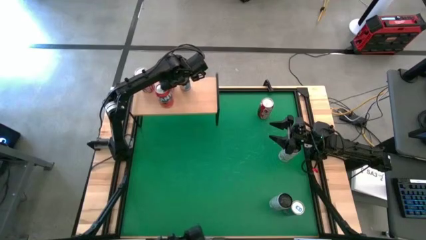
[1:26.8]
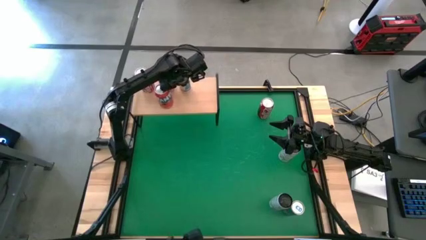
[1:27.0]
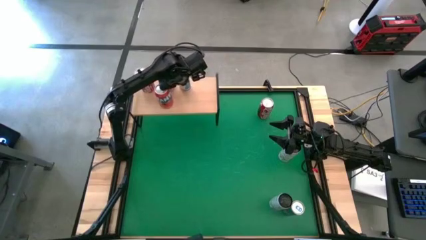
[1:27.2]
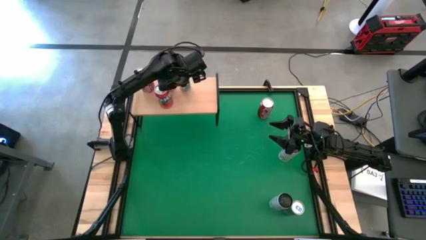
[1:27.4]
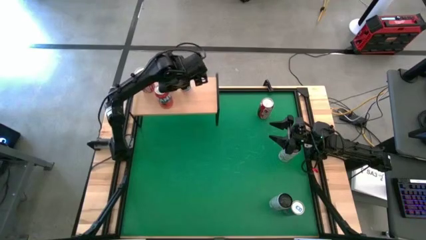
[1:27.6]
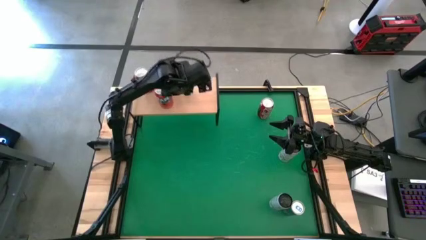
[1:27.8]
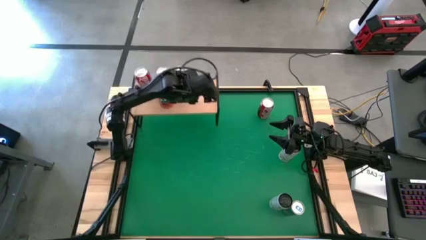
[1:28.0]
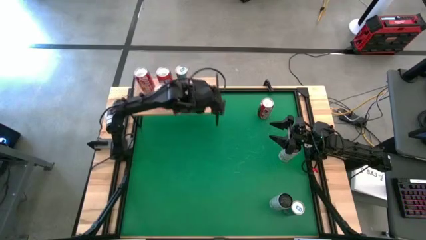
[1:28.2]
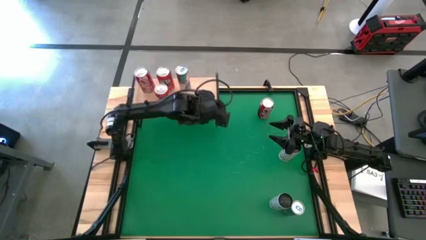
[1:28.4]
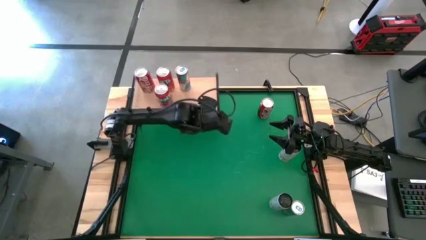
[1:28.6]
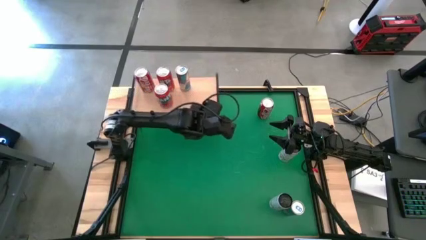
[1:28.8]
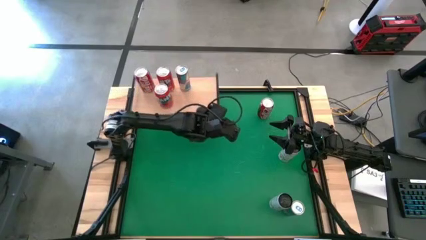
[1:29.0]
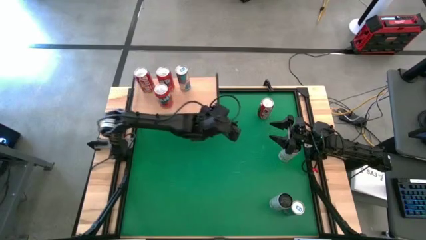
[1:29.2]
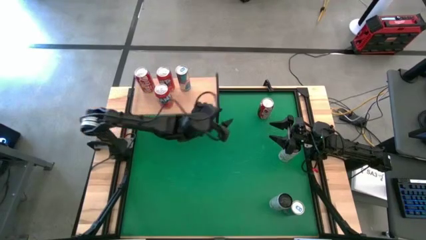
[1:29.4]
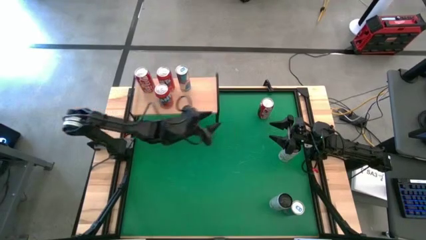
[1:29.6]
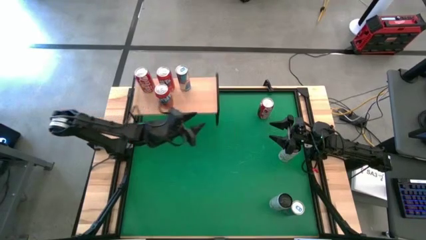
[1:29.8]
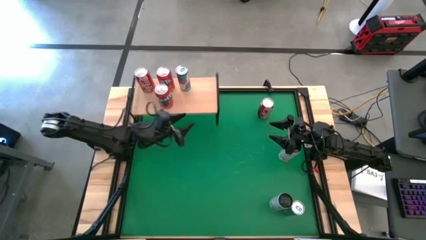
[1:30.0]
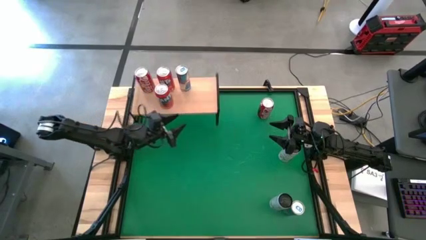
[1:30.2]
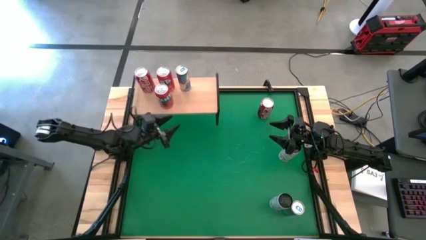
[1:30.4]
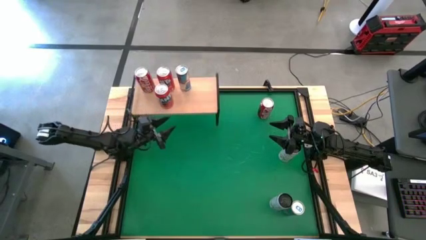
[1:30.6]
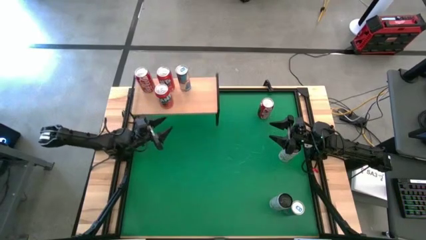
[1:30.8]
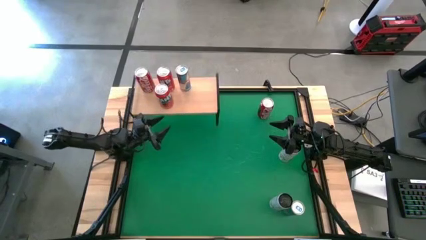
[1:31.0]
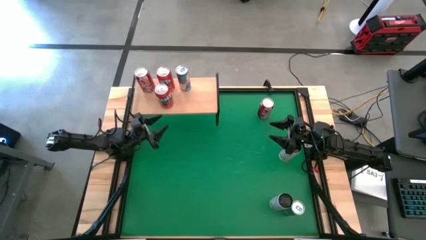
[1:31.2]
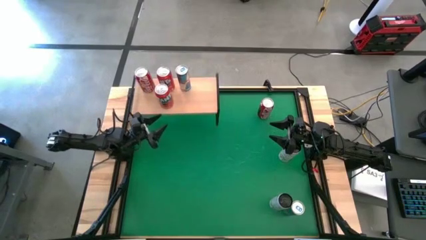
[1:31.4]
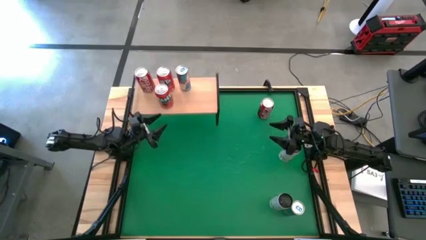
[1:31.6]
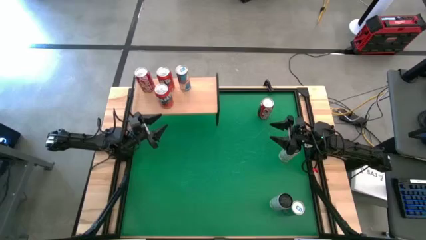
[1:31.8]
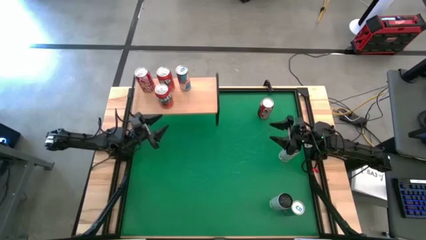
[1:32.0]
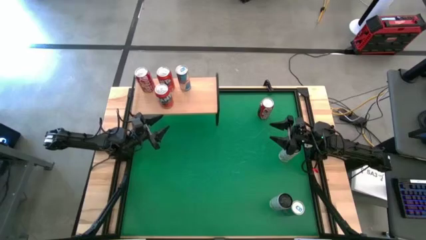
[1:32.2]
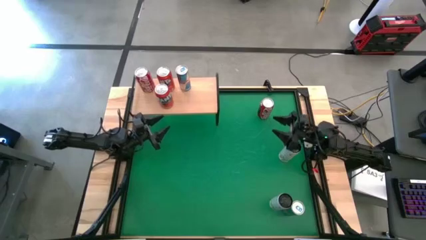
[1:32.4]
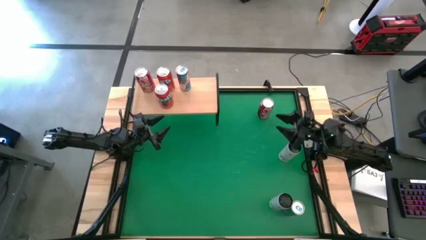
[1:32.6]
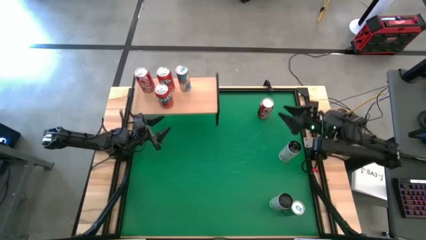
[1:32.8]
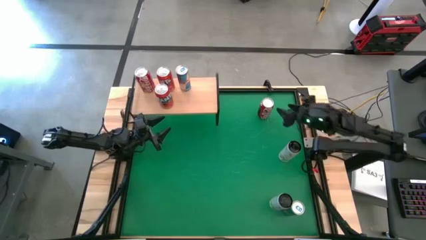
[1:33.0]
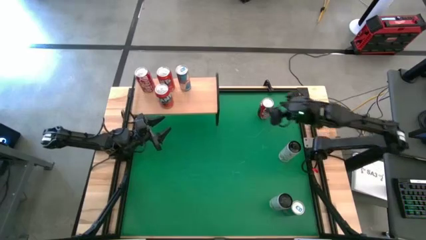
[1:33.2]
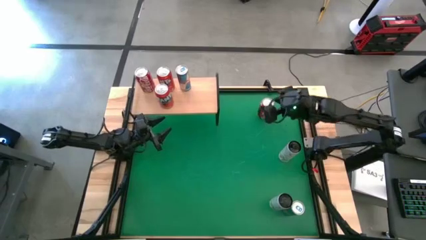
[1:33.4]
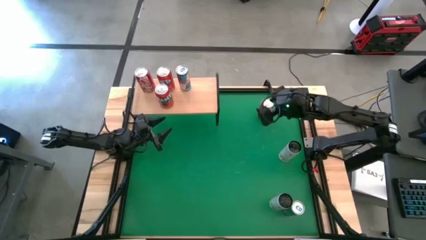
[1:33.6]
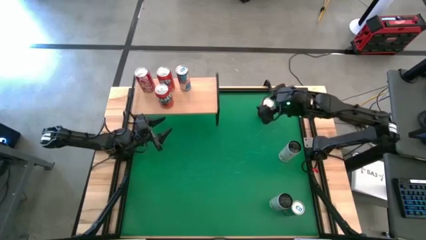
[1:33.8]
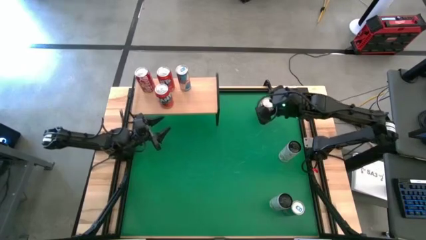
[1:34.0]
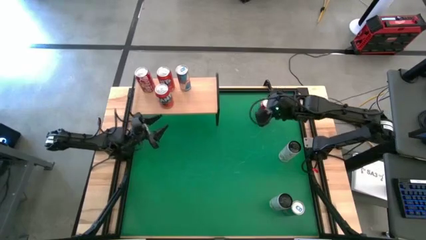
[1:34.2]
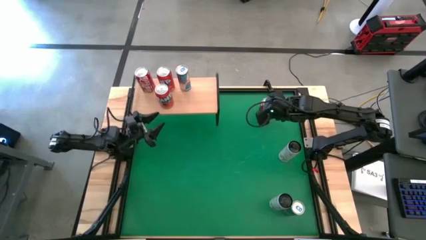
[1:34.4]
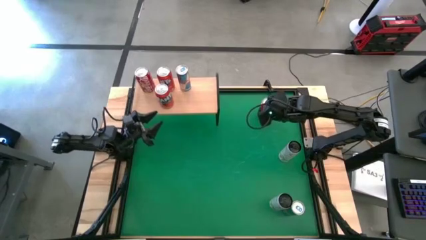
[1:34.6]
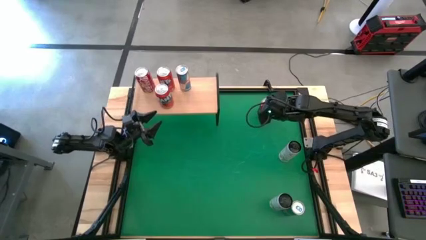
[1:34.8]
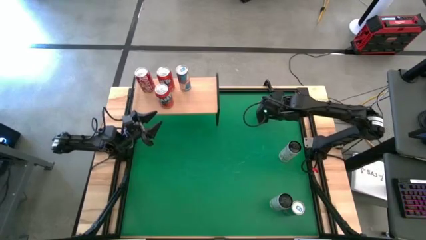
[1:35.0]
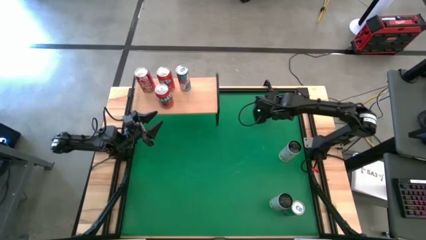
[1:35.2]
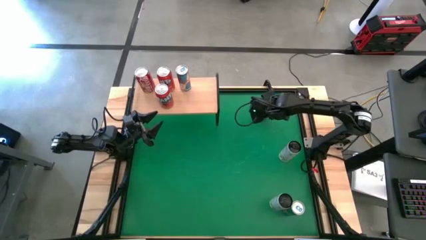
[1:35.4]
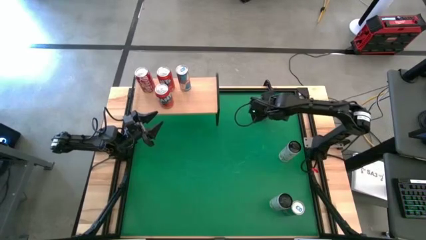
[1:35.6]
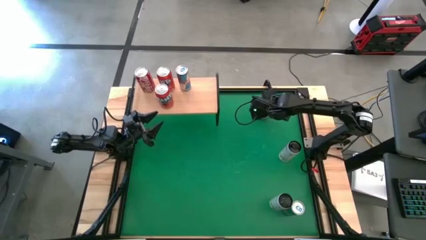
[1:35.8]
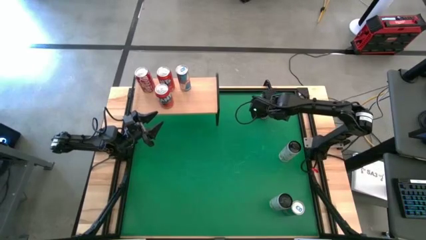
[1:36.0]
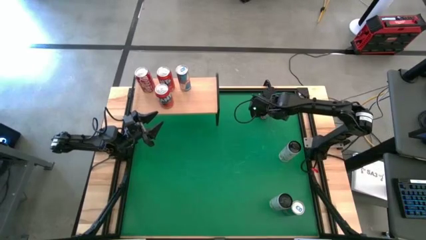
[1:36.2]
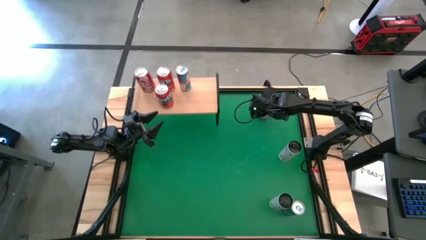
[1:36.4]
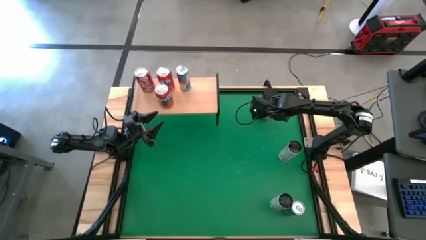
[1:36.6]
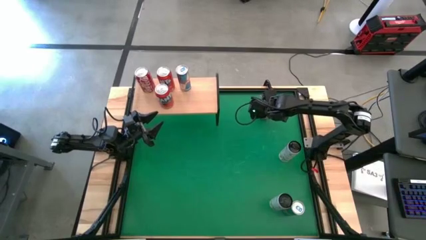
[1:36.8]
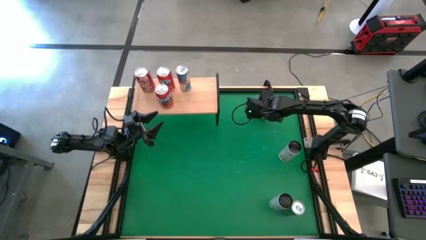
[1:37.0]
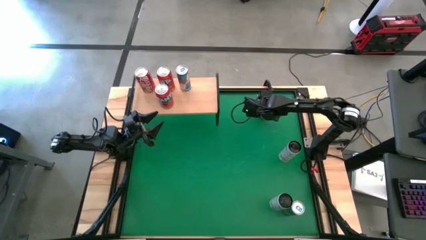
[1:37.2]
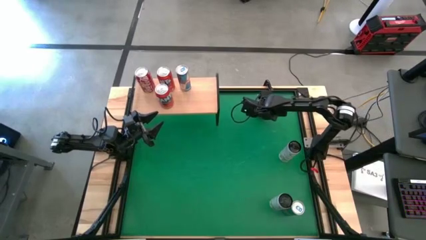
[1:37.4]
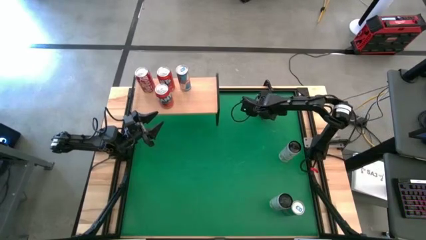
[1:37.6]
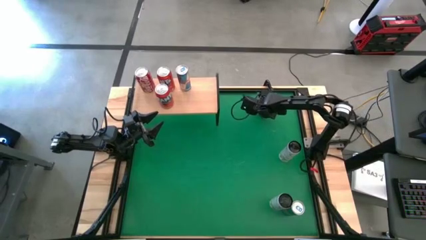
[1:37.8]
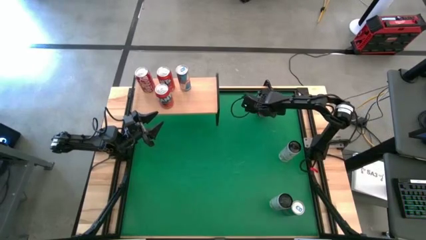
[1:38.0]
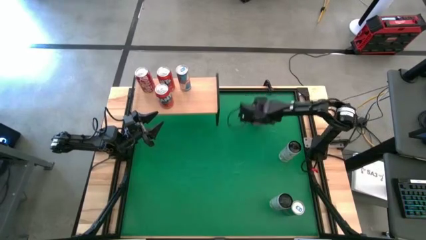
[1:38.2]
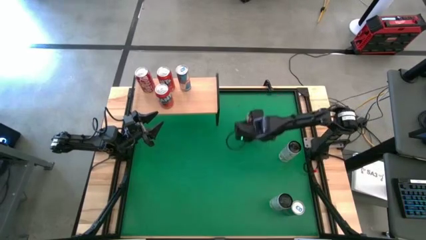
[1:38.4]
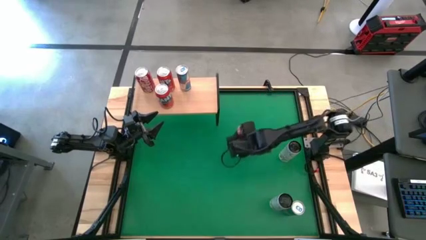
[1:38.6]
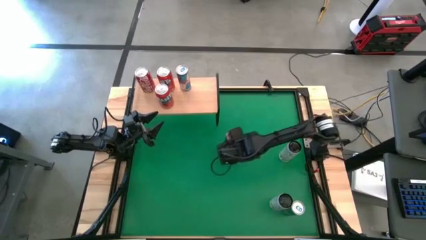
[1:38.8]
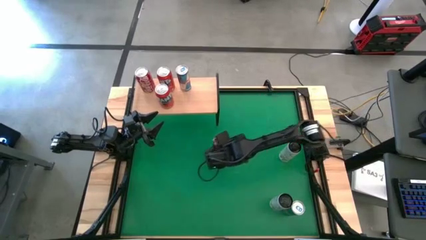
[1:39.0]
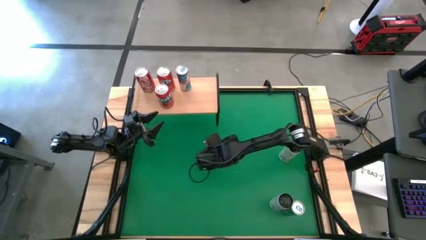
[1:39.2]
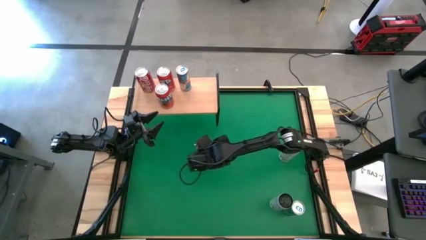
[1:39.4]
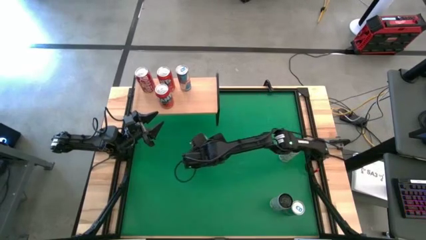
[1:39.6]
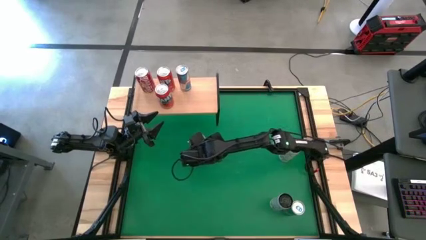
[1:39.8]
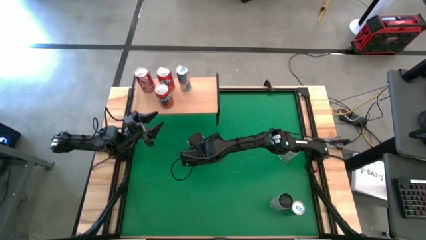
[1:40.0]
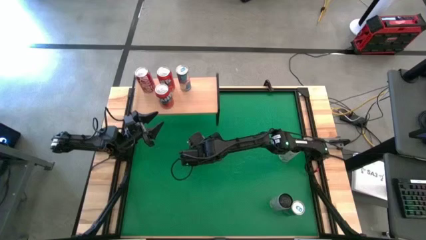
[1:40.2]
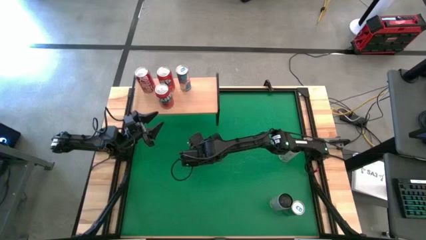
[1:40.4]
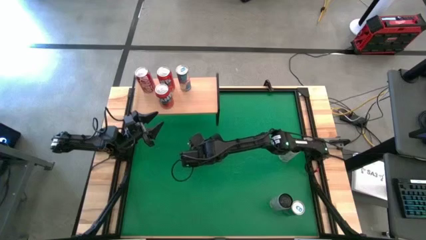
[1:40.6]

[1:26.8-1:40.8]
Task: Place canned beverage on shelf
Move the red white soda can to the center of the table
